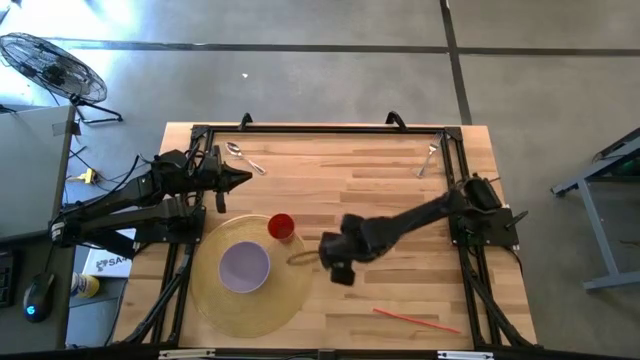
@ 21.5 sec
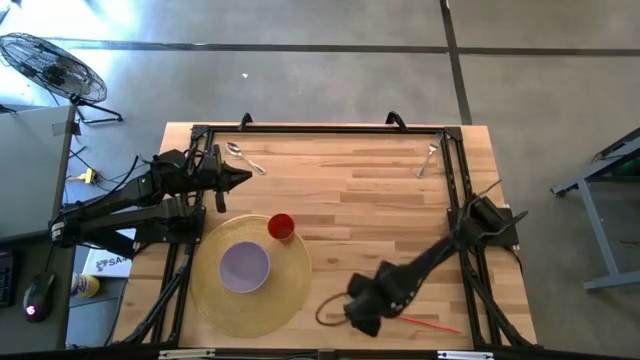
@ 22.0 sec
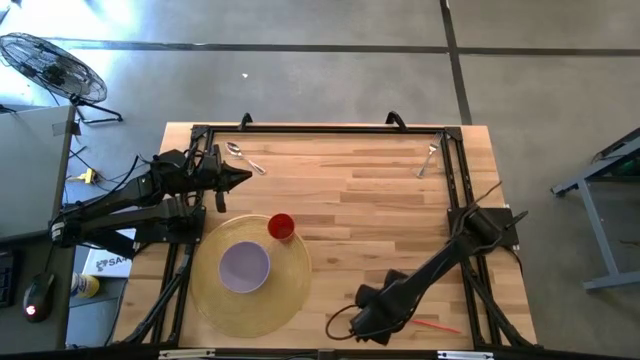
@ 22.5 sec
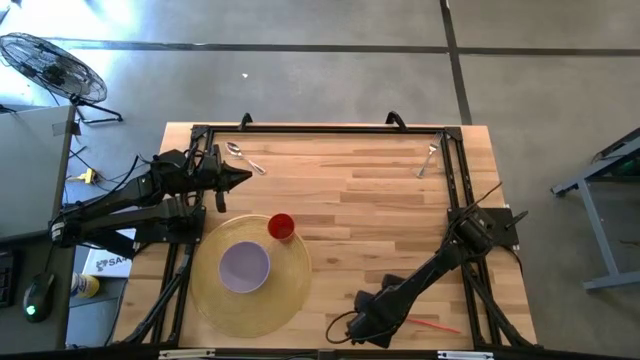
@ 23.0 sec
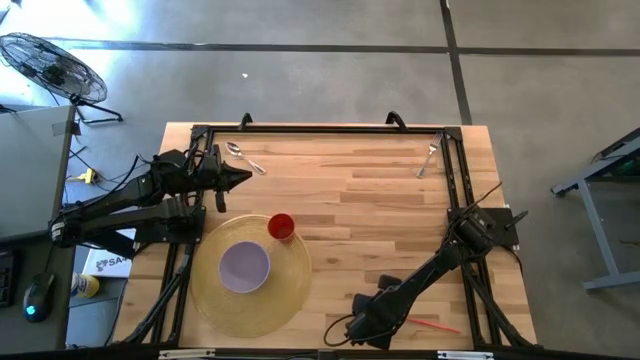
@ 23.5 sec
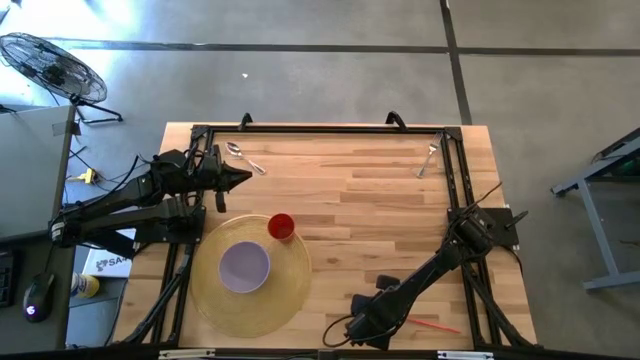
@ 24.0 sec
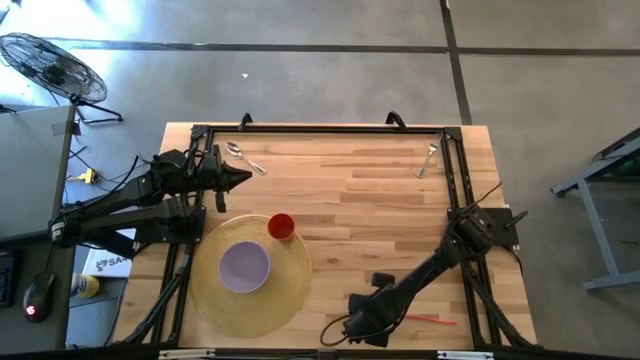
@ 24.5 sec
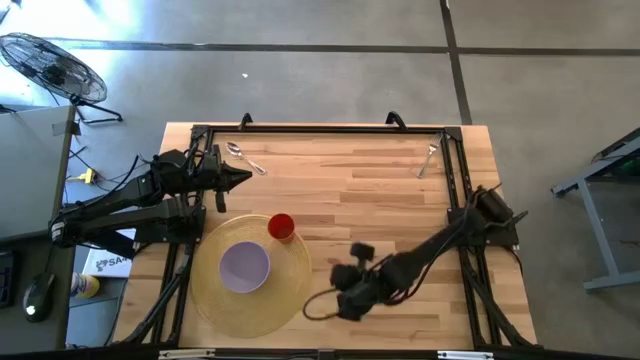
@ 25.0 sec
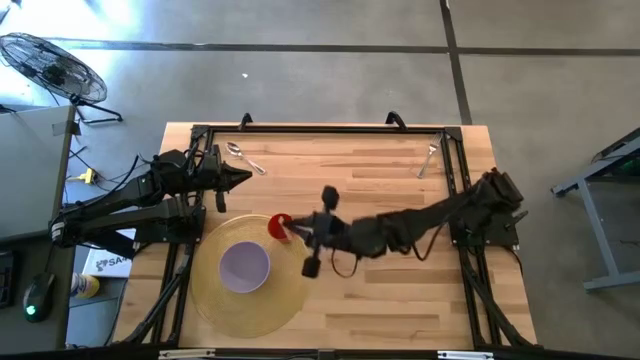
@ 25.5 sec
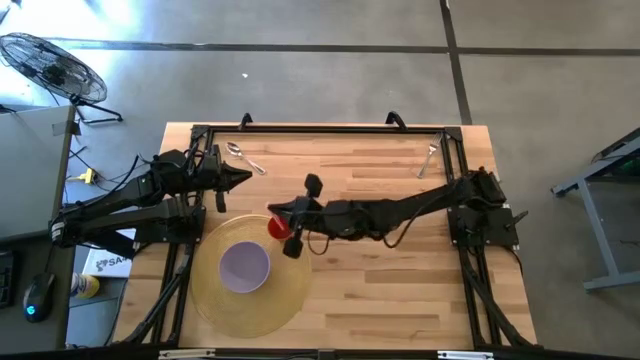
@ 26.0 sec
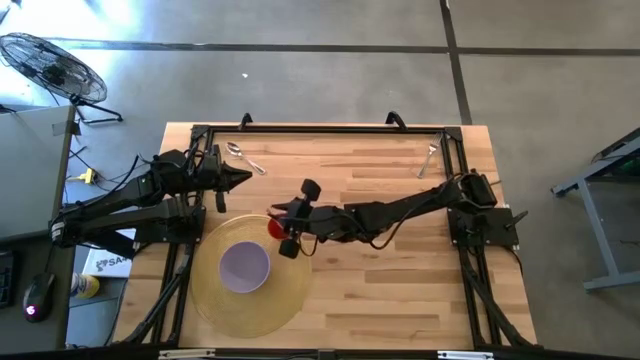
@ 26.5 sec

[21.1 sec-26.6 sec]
Task: Pick & Place Utensil
Put the orange straw into the orange cup on the brown mat

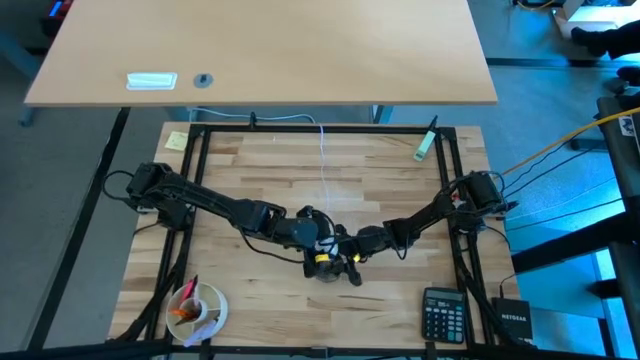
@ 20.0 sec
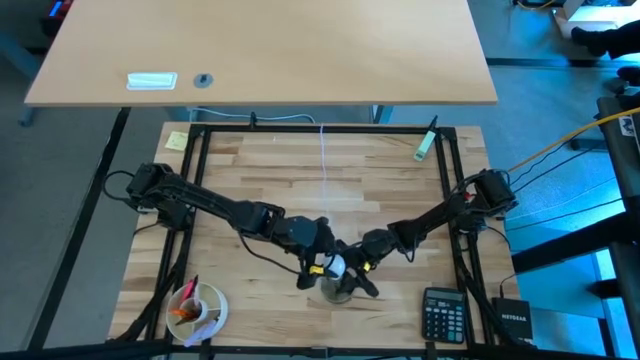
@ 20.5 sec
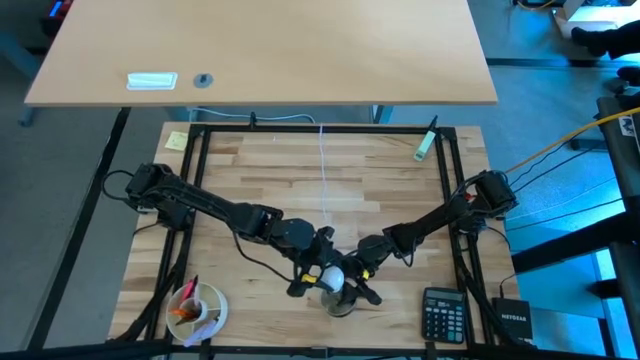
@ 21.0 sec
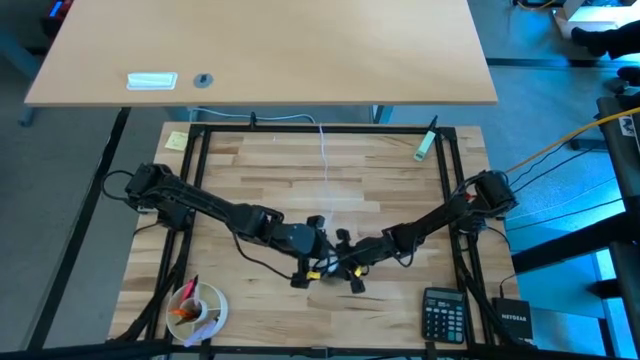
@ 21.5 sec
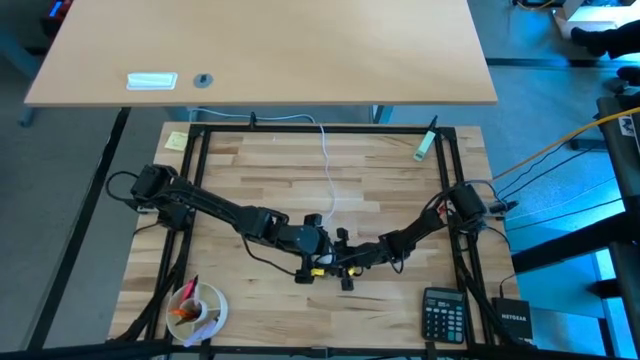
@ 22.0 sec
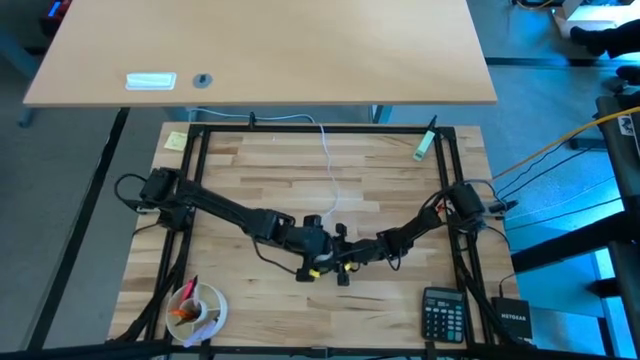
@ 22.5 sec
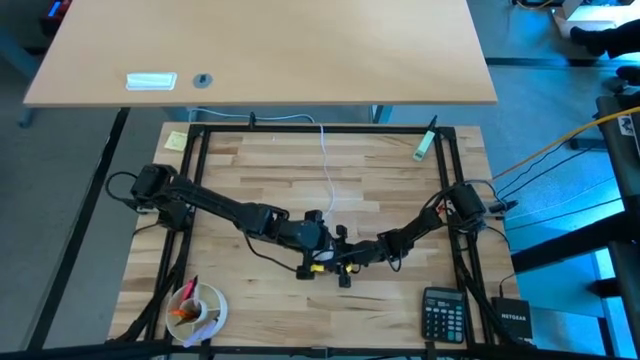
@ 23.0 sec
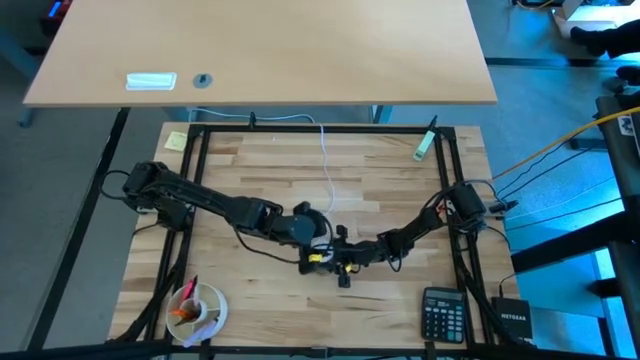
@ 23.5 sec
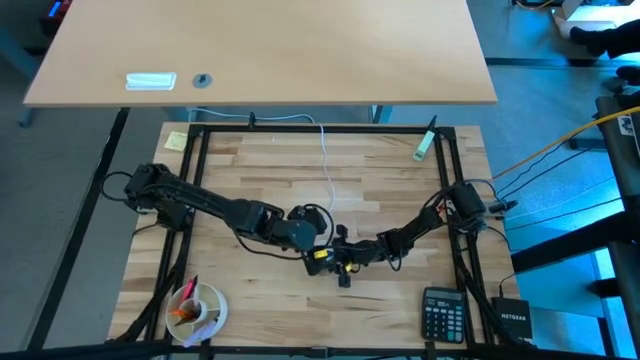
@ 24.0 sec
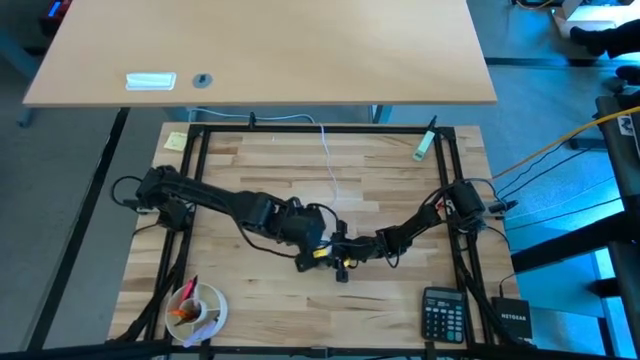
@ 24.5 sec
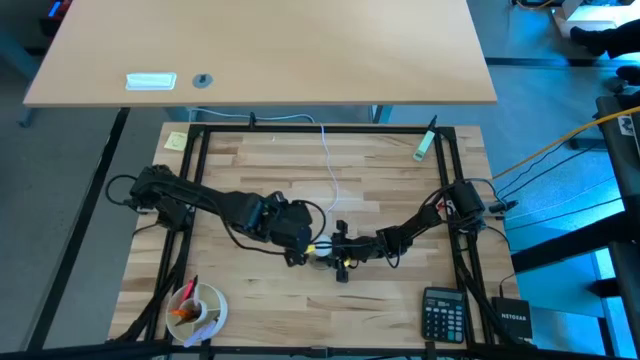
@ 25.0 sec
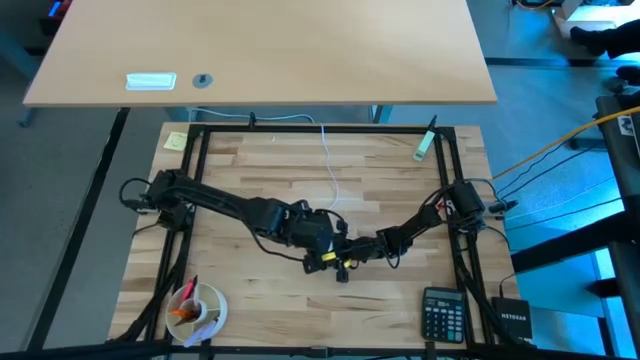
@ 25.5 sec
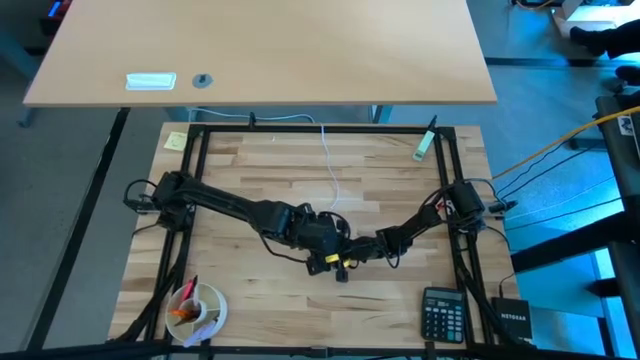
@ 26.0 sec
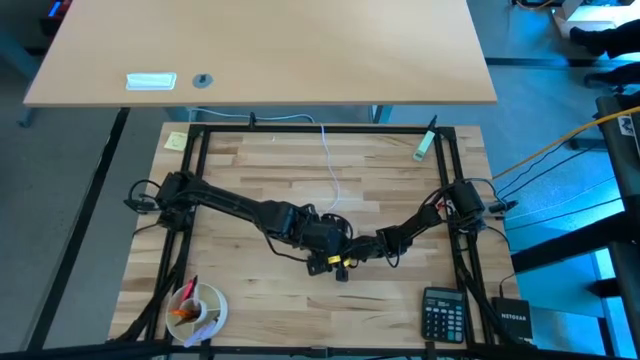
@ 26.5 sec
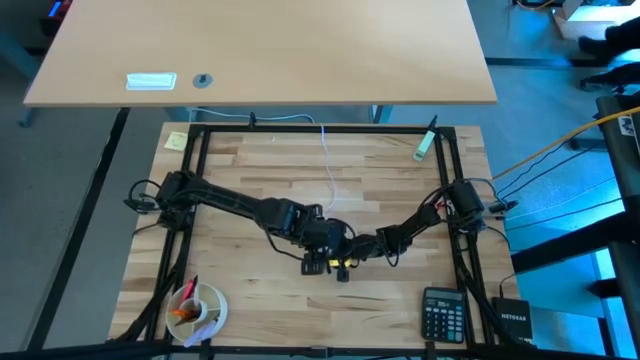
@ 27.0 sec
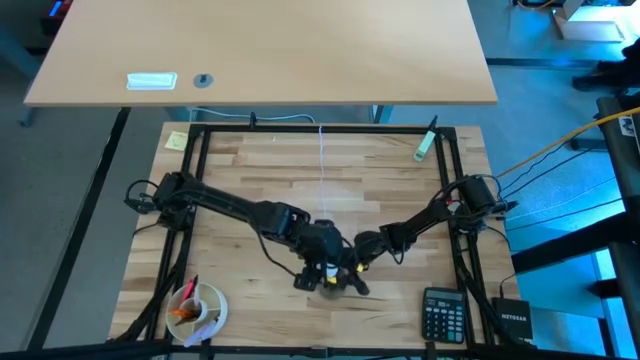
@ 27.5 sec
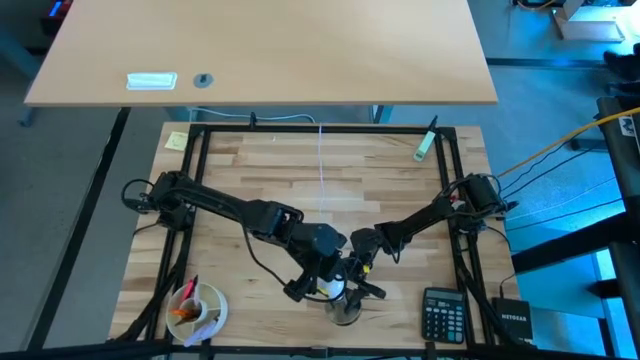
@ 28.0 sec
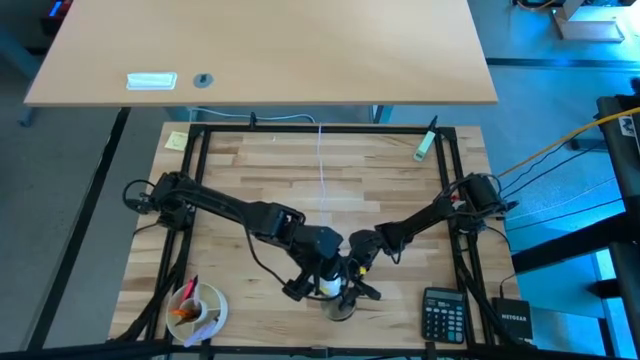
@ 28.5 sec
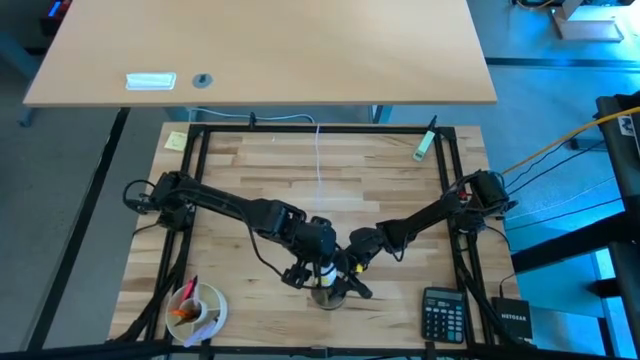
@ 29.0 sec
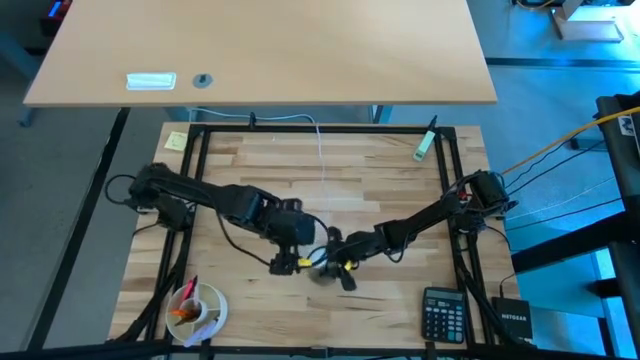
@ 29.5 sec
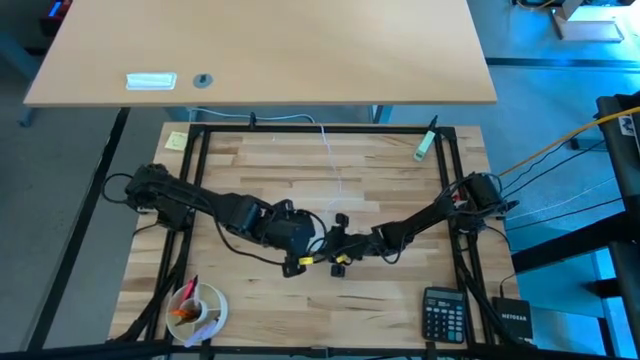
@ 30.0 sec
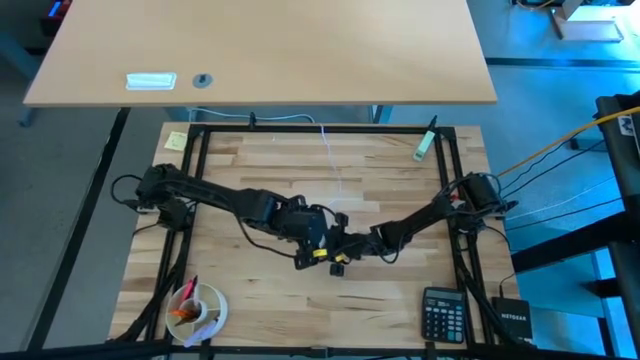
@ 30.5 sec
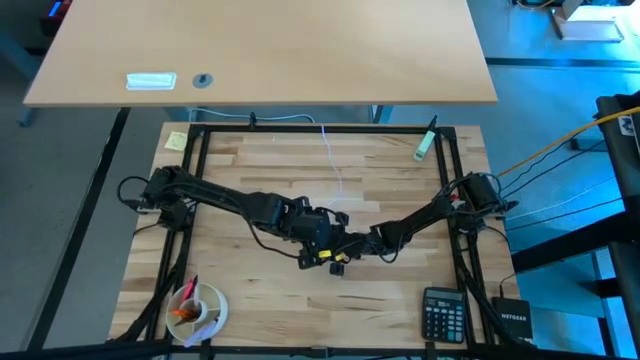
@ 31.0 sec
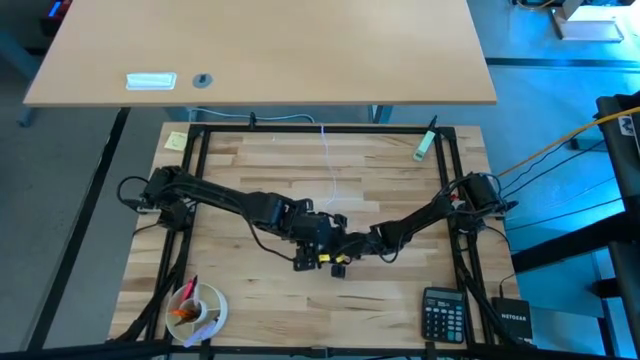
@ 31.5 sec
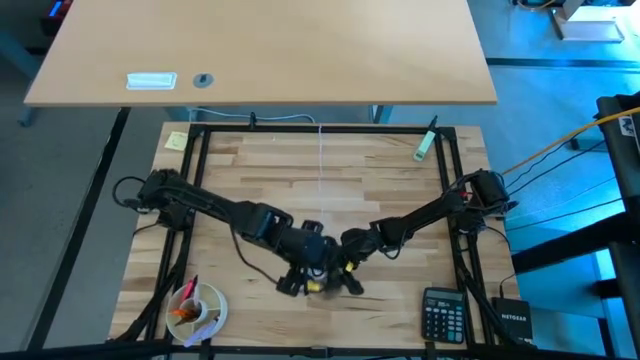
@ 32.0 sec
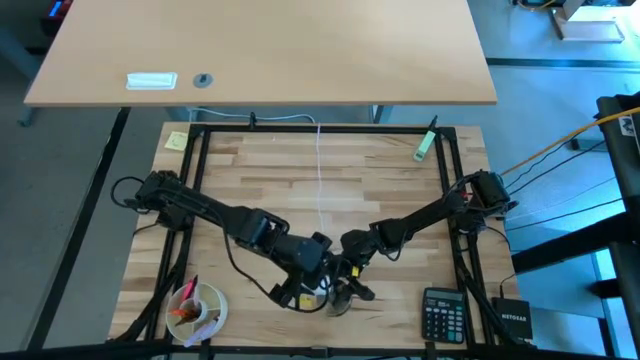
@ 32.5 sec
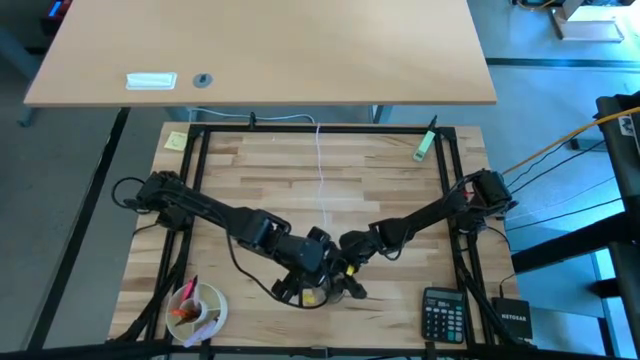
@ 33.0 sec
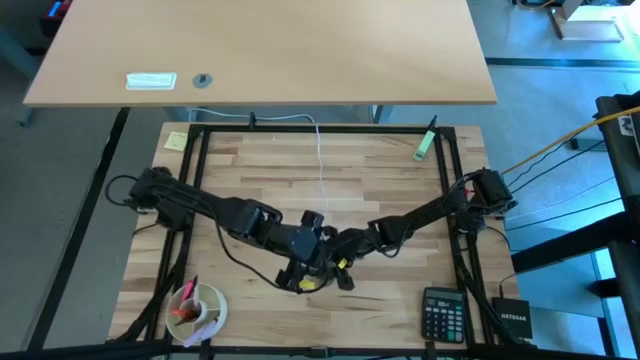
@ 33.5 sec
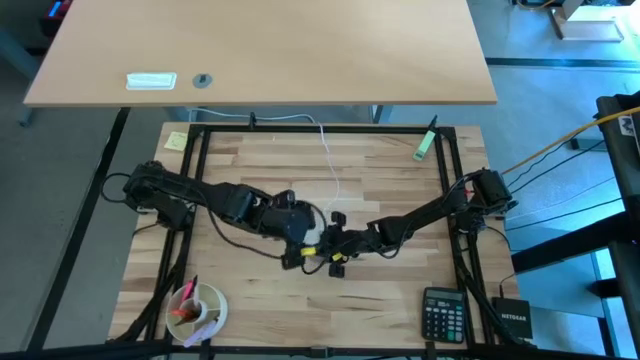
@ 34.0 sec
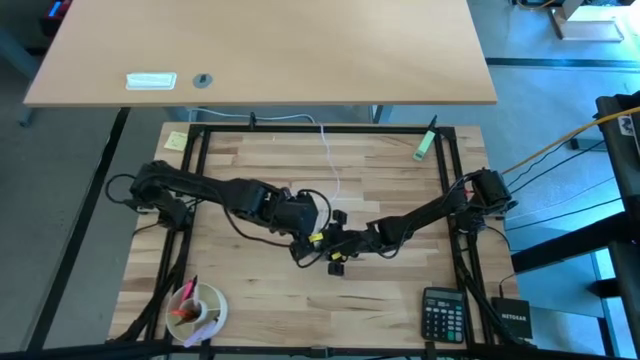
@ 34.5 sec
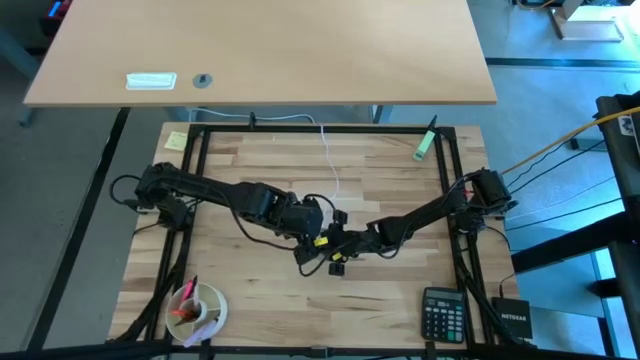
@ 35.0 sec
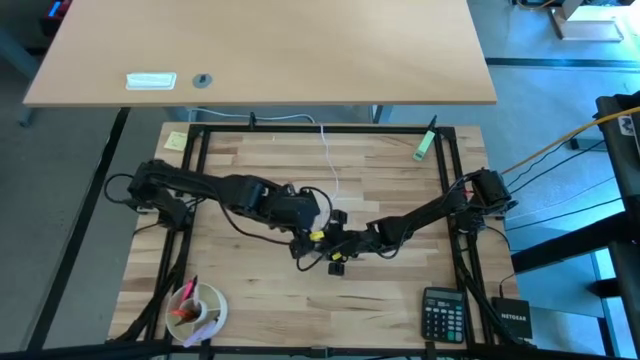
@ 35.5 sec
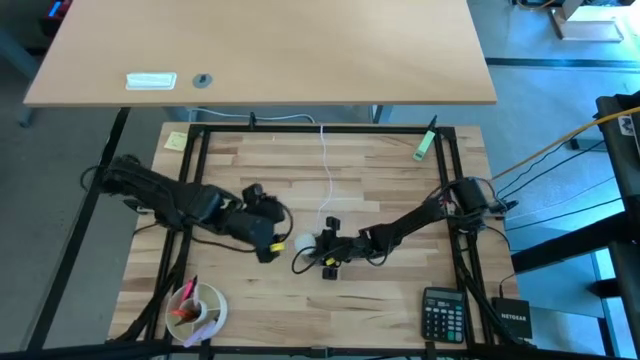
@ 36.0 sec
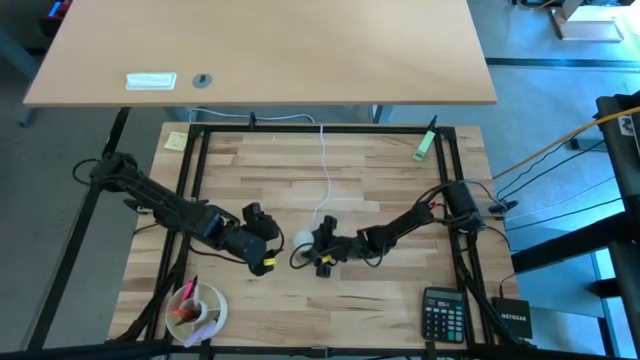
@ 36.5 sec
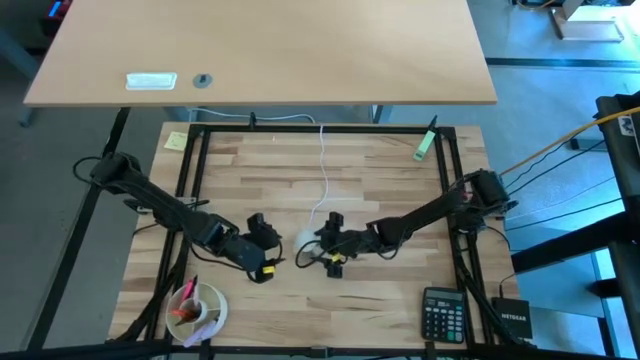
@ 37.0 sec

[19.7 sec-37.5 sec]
Task: Screw lightbulb
Insert the white lightbulb into the silver lamp
